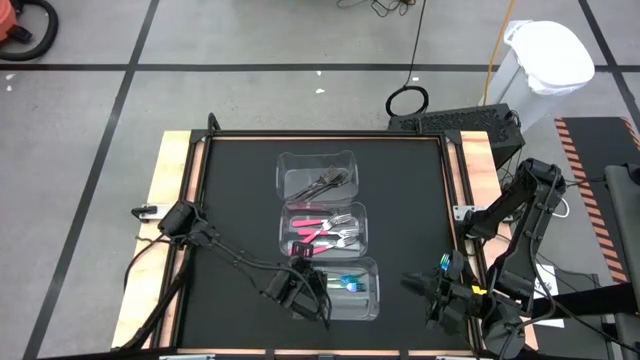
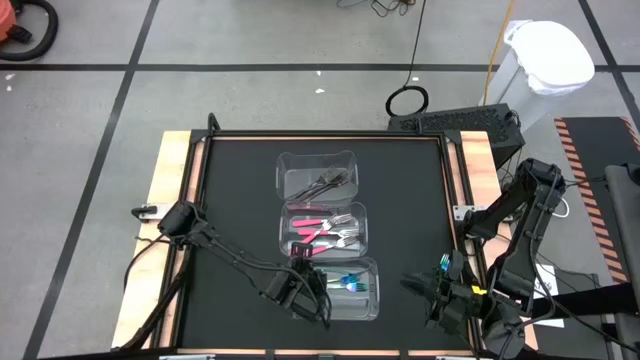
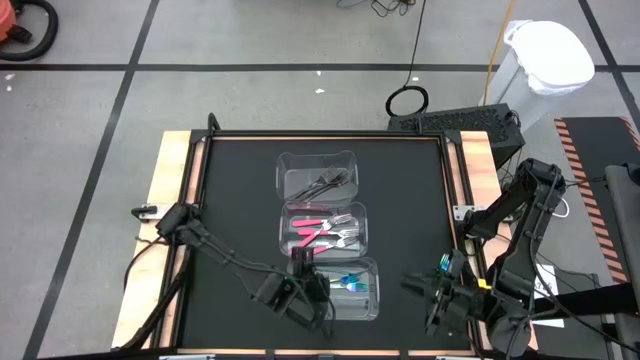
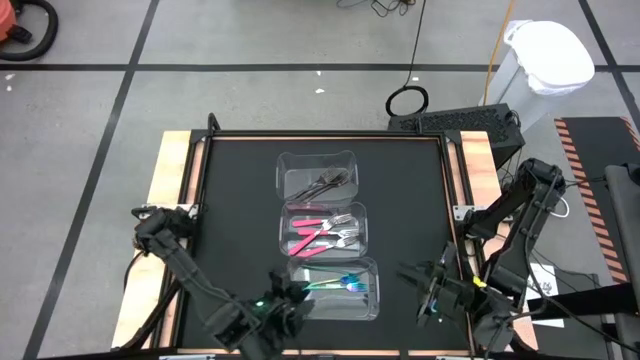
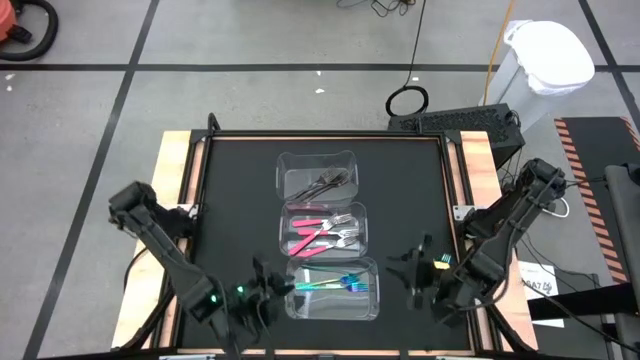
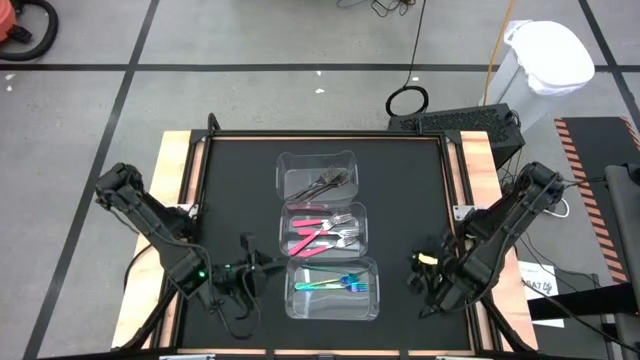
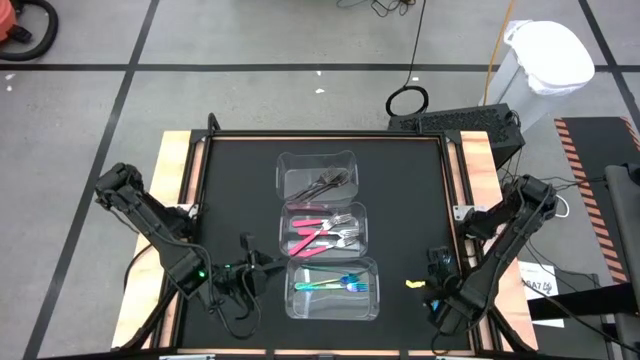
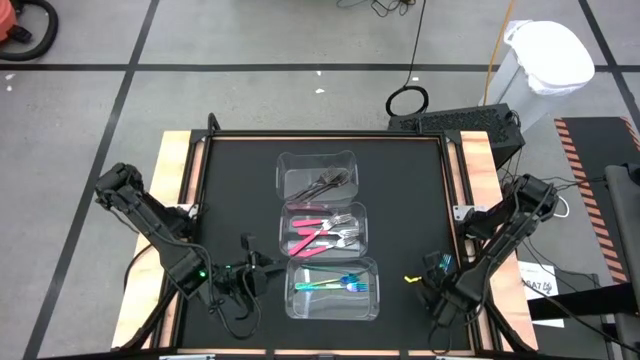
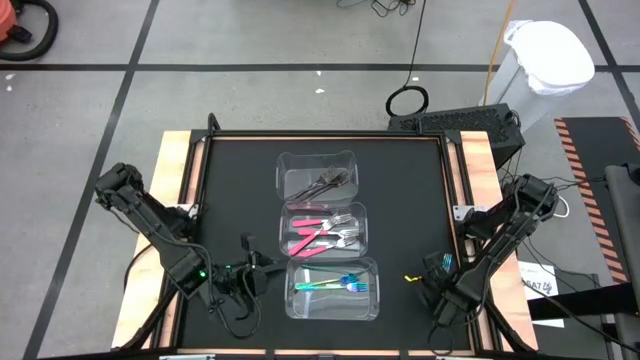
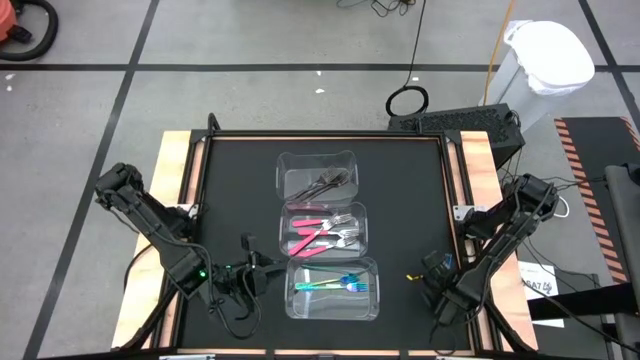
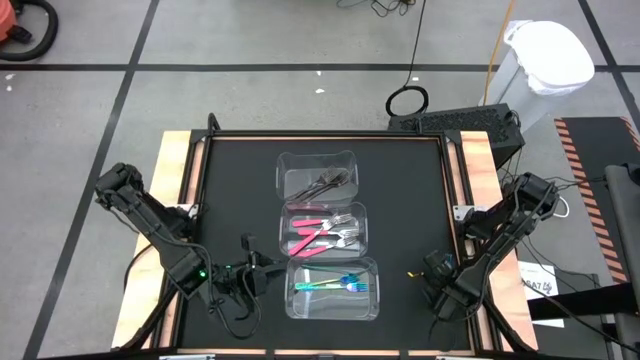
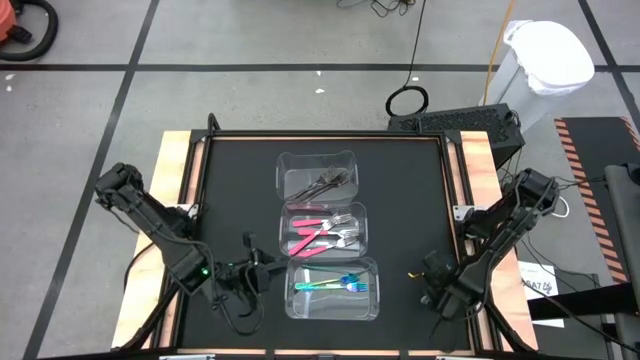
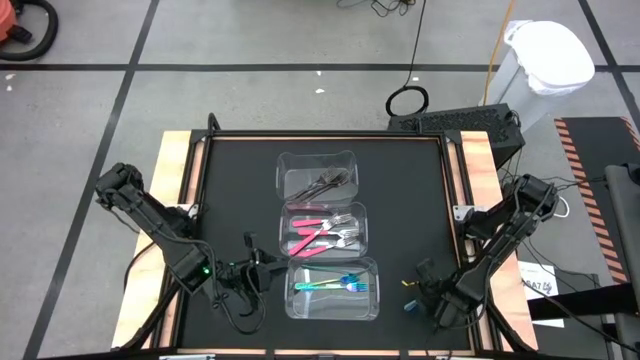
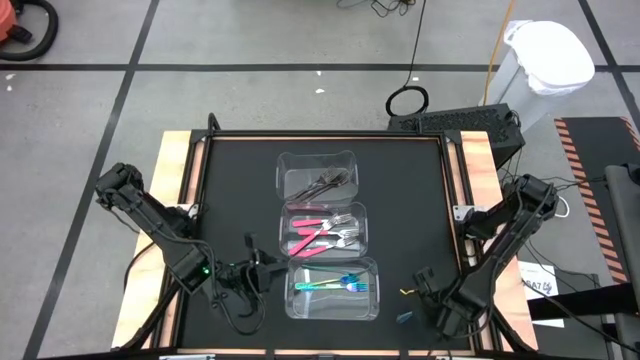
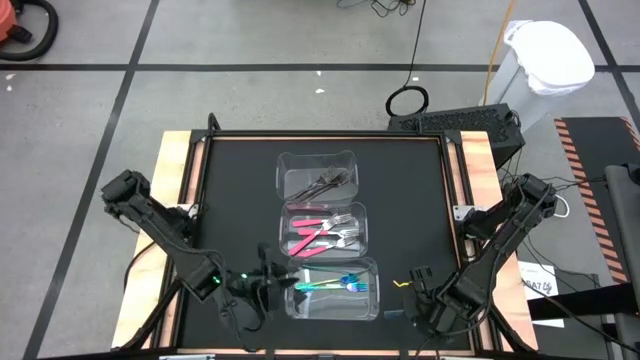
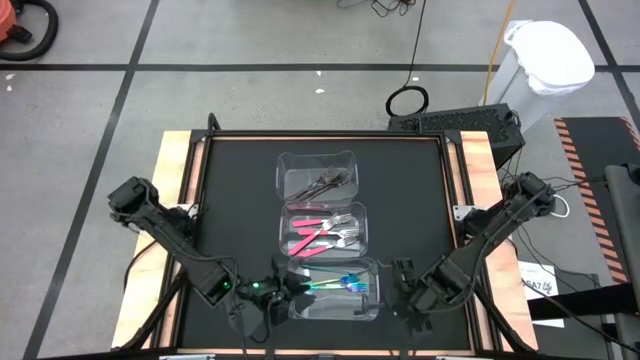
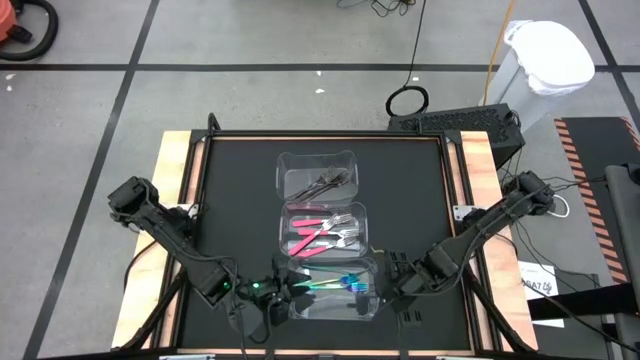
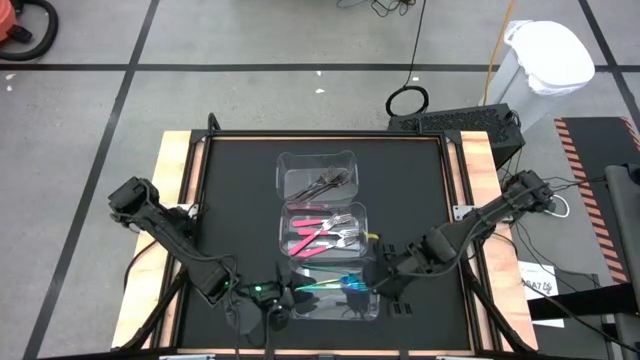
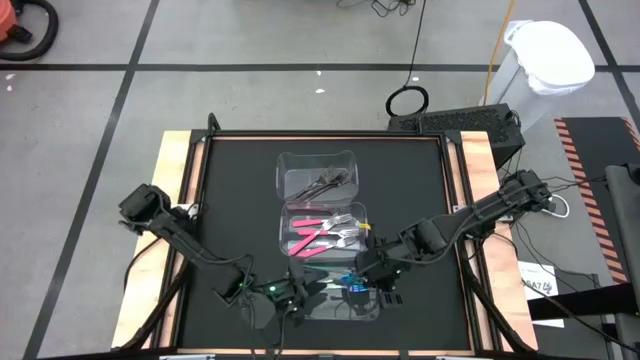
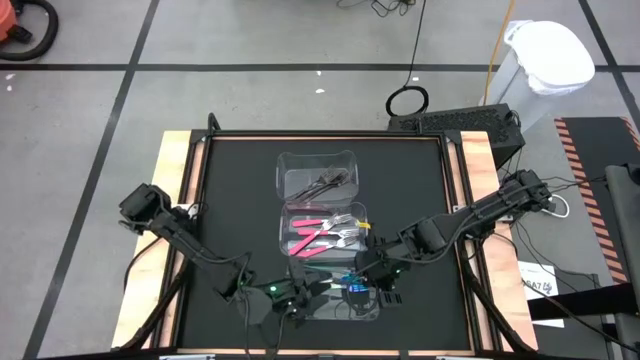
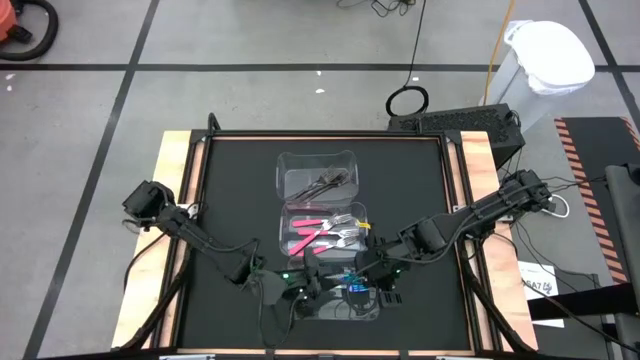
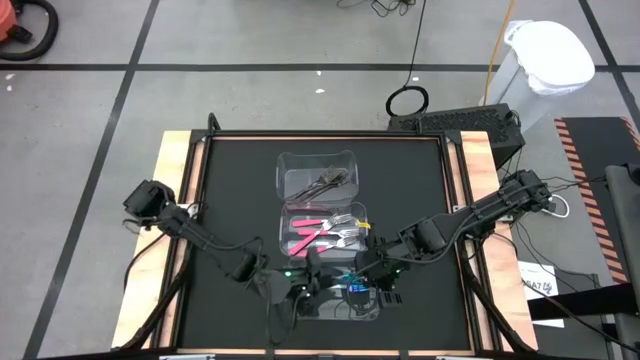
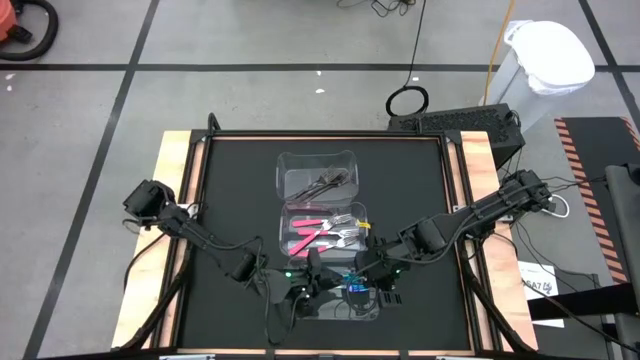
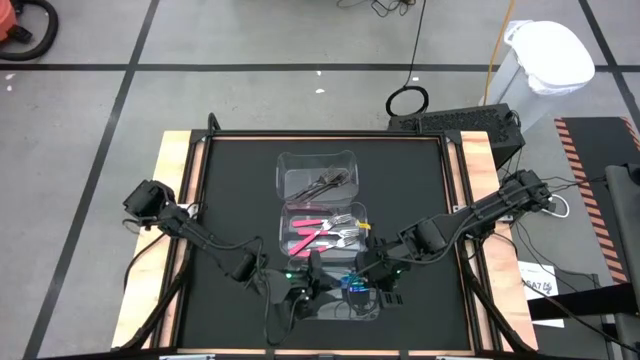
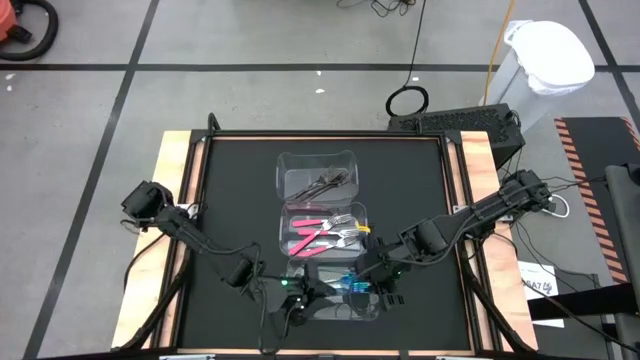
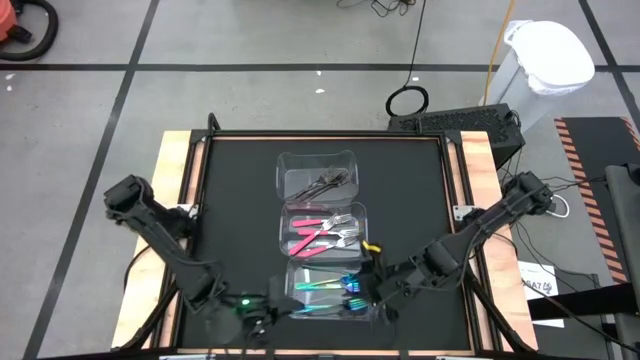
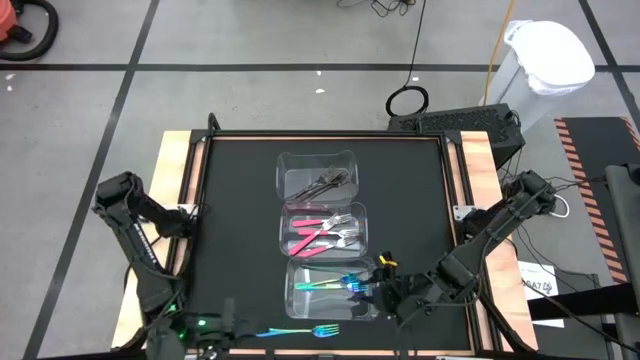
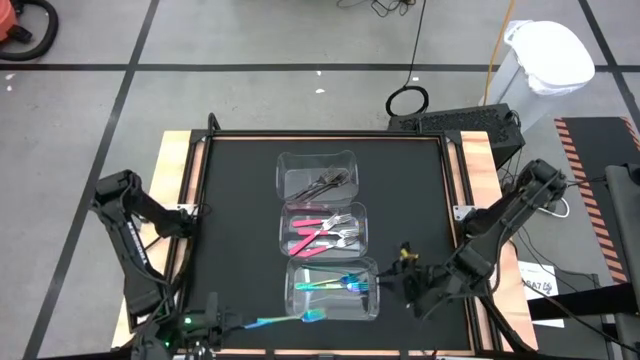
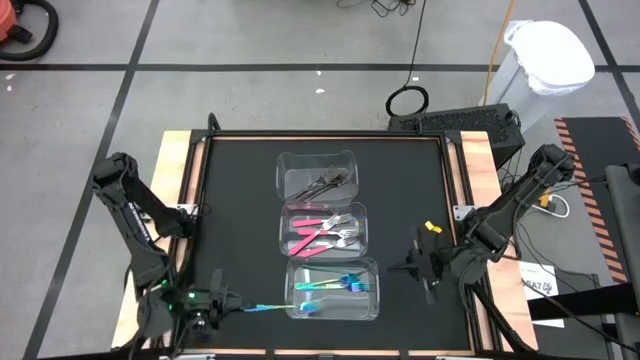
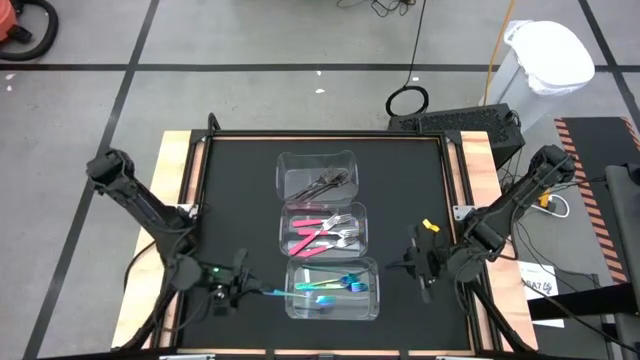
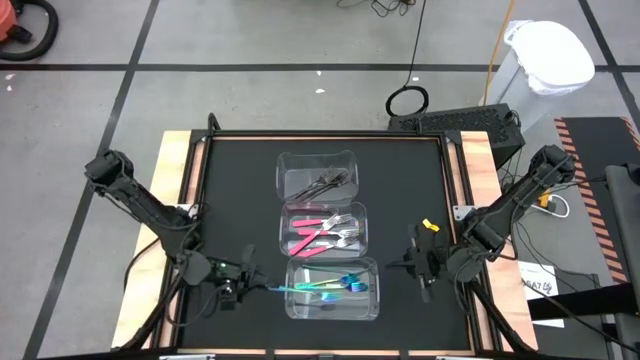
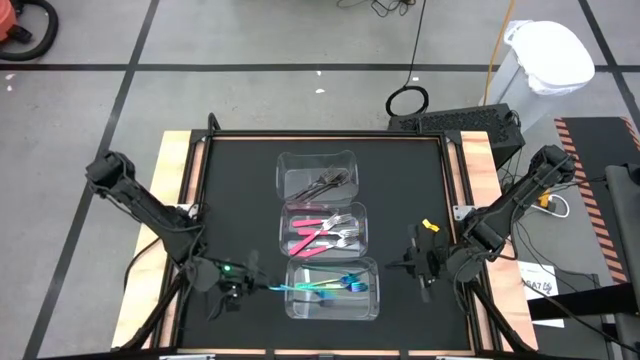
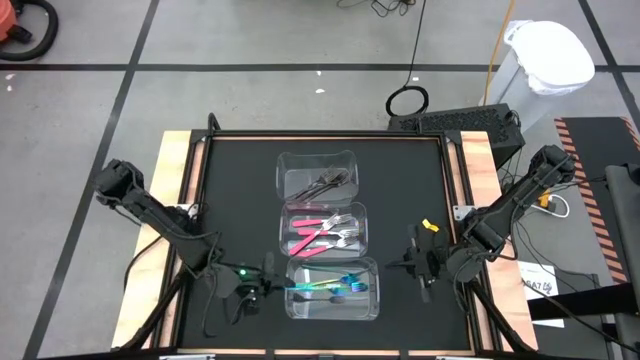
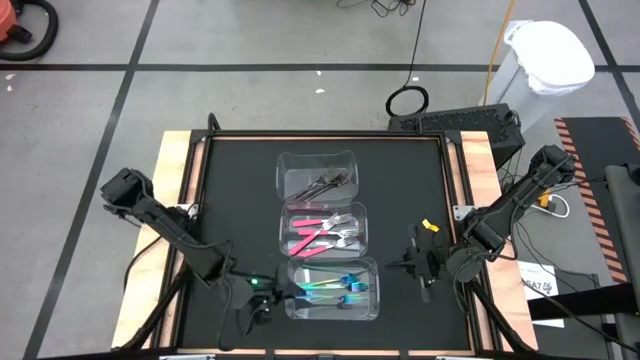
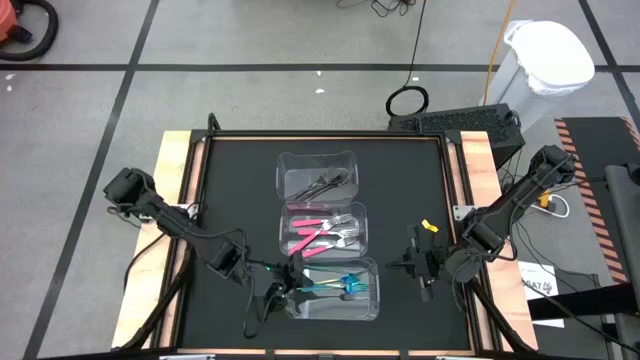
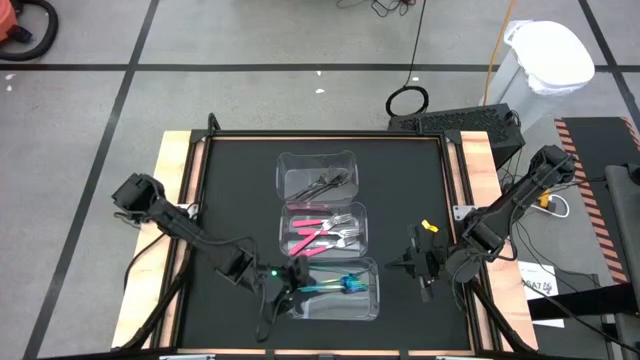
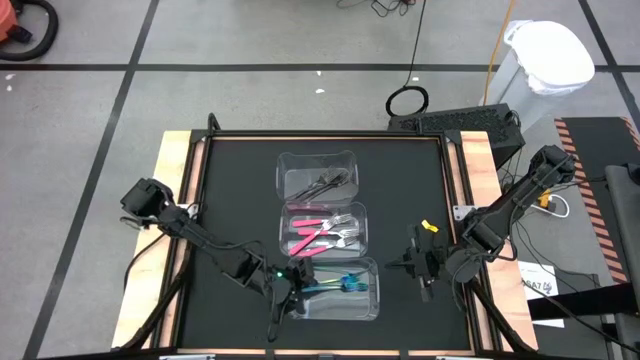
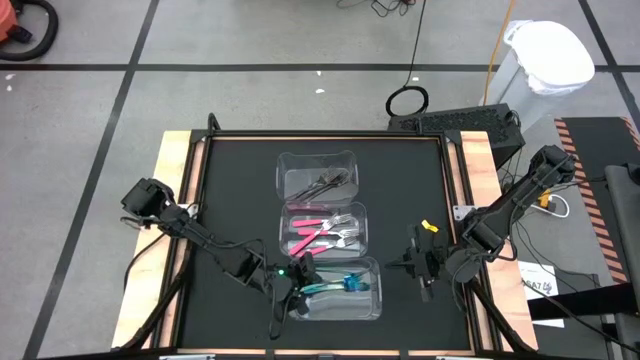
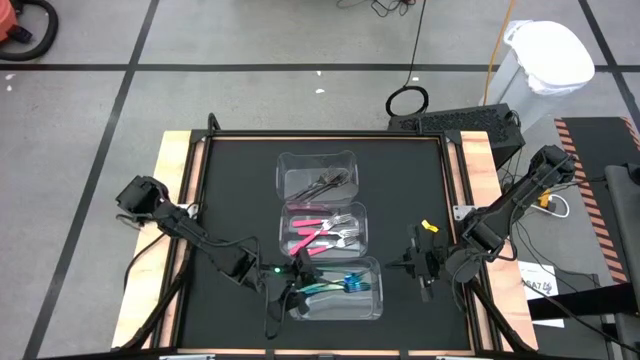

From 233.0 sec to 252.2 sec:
Task: Sort silverware by color (type)
Put the blue fork into the bottom transparent bin

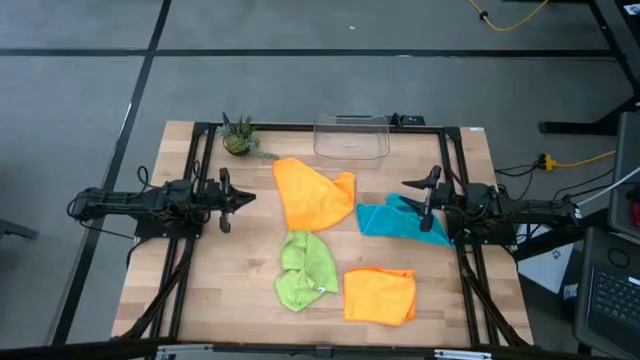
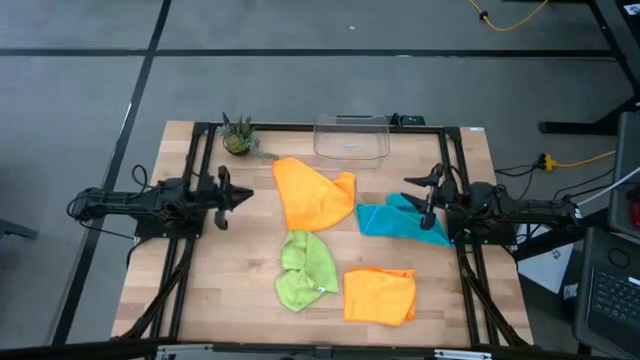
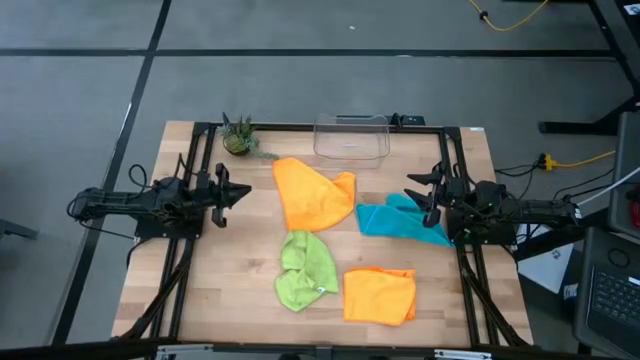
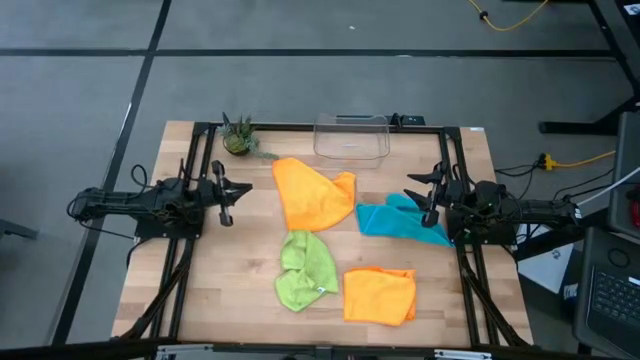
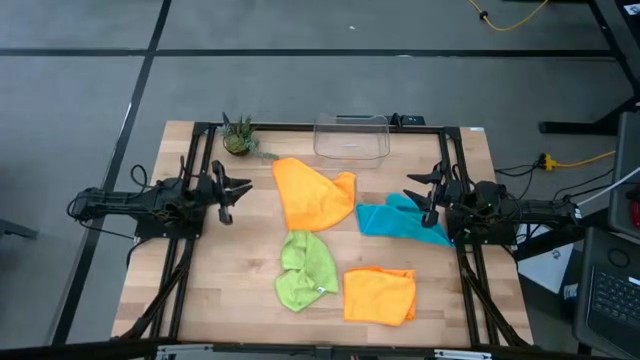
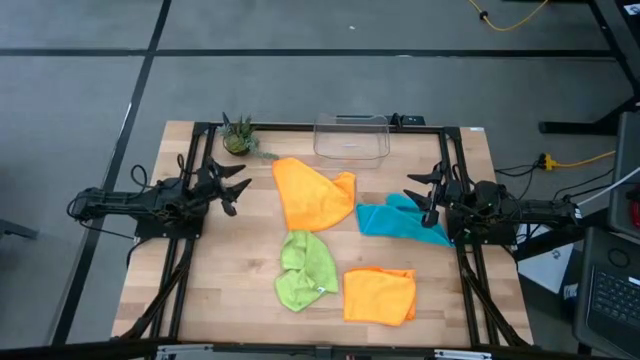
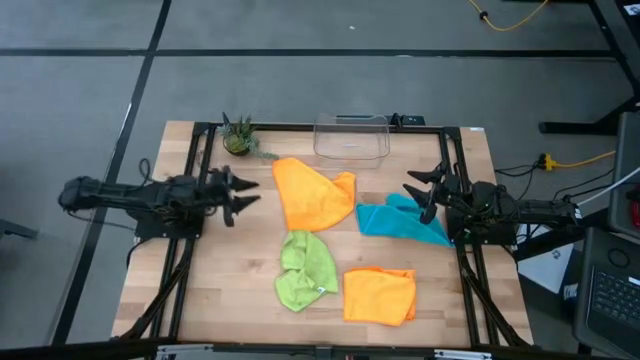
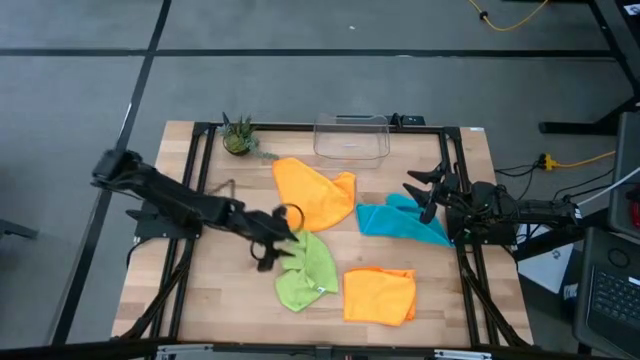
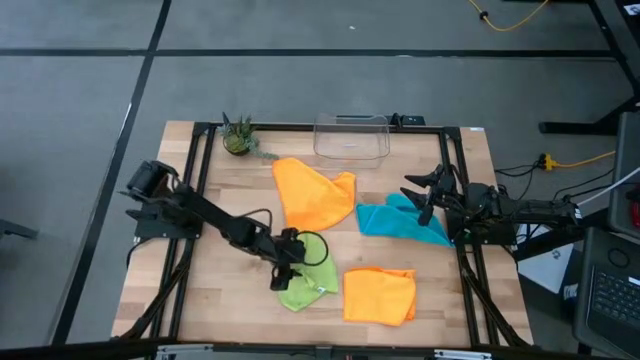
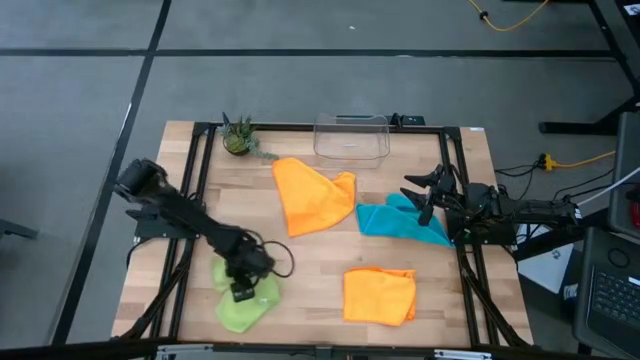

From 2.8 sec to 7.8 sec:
Task: Fold microfiber towels
Adjust the green towel on the table
